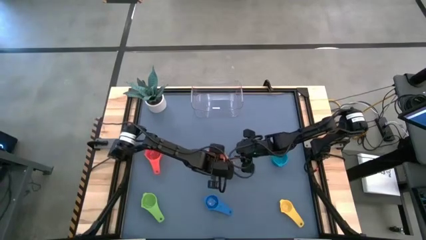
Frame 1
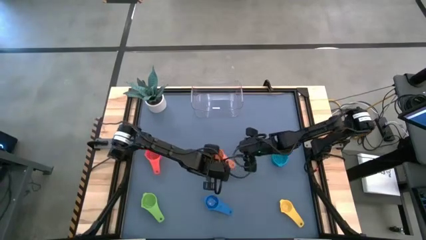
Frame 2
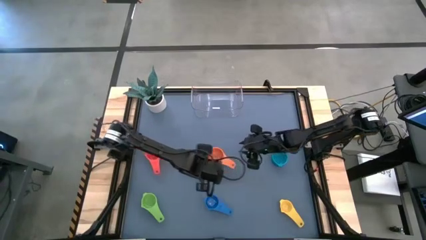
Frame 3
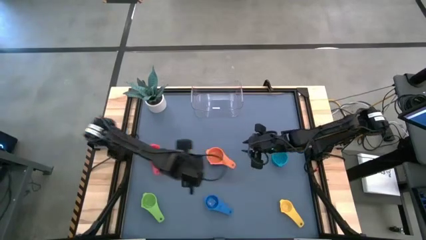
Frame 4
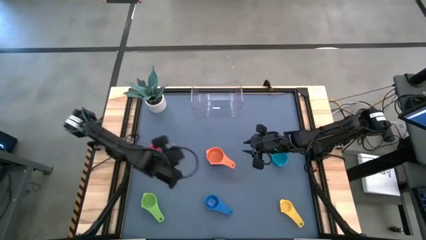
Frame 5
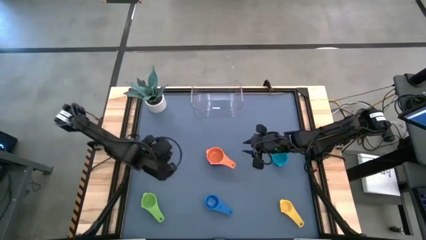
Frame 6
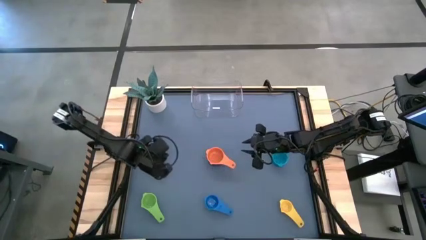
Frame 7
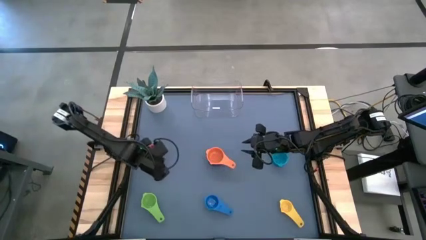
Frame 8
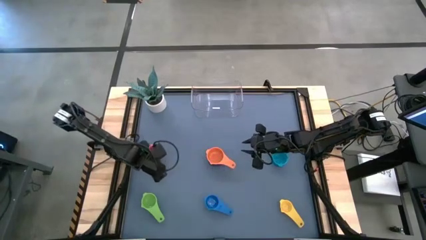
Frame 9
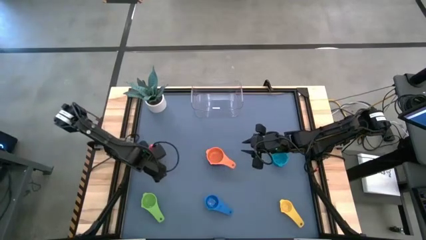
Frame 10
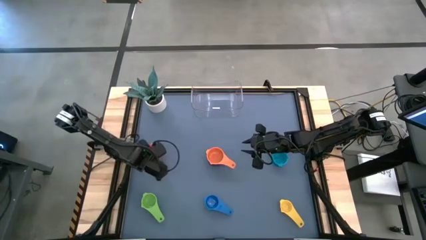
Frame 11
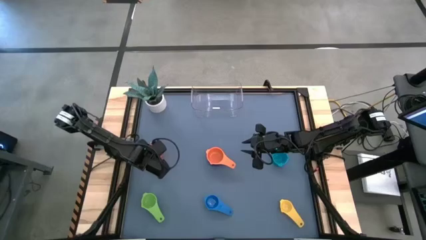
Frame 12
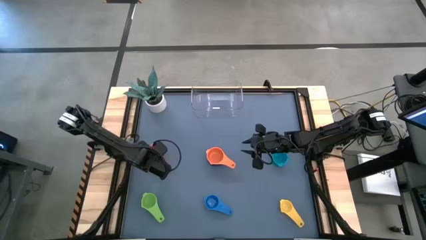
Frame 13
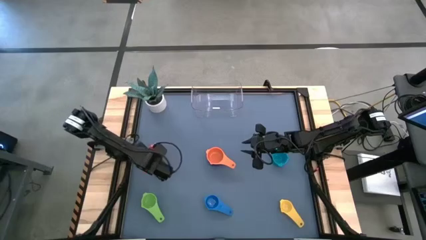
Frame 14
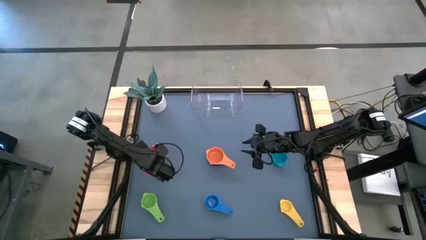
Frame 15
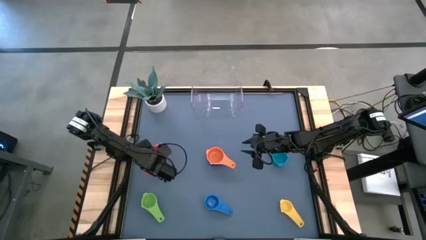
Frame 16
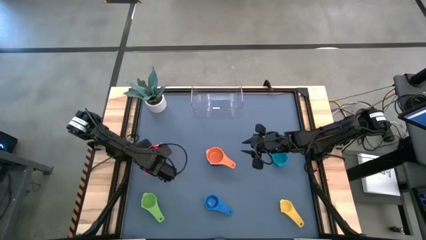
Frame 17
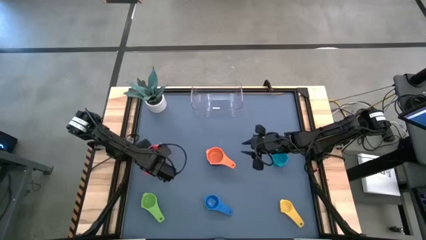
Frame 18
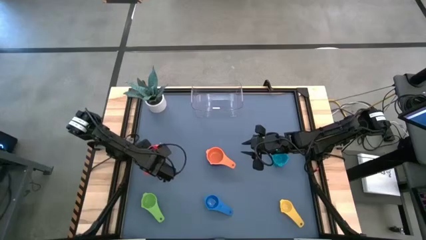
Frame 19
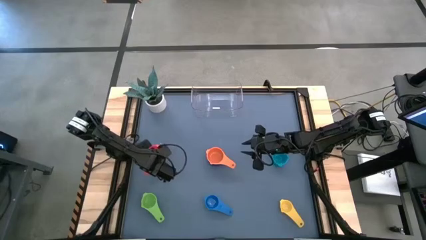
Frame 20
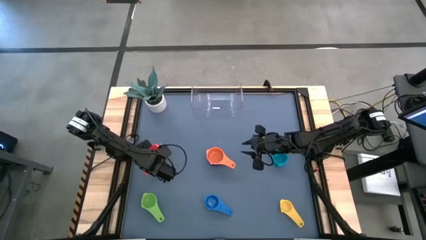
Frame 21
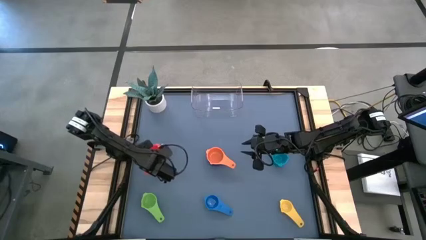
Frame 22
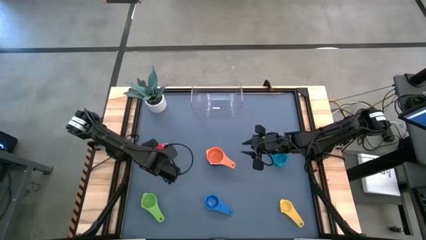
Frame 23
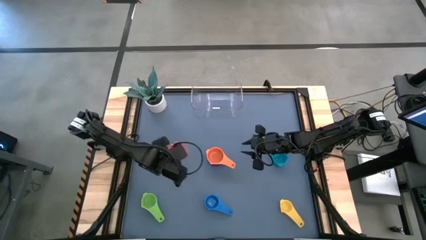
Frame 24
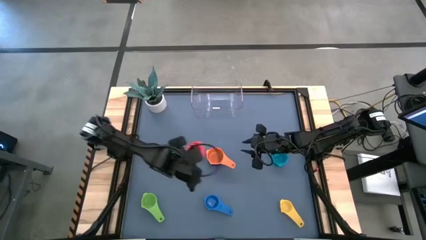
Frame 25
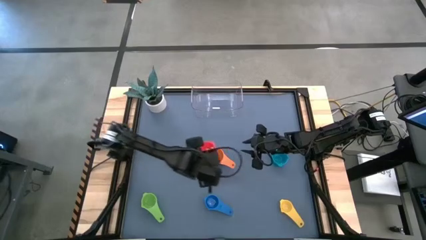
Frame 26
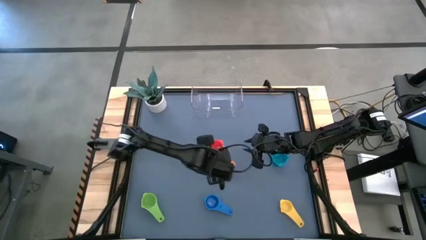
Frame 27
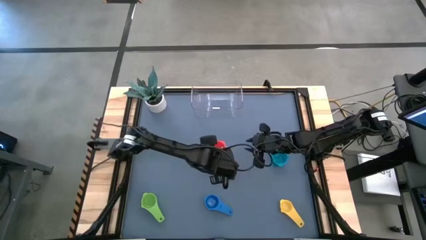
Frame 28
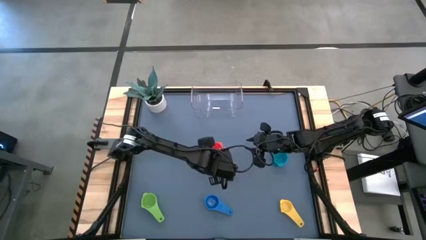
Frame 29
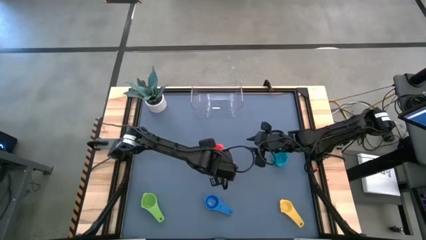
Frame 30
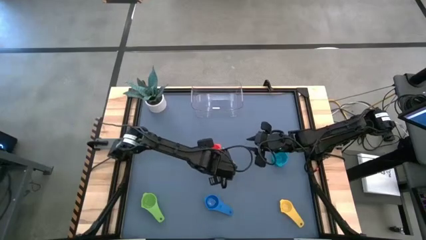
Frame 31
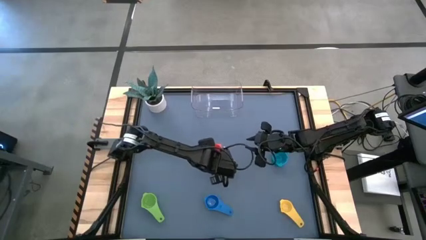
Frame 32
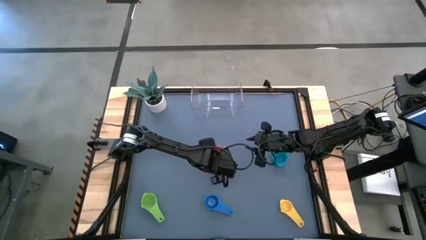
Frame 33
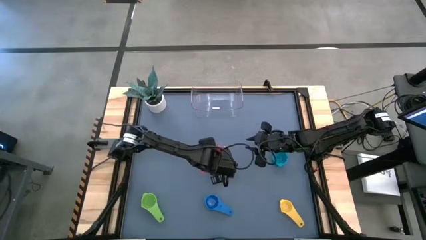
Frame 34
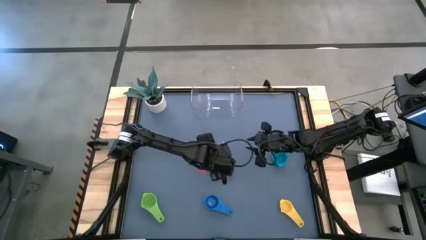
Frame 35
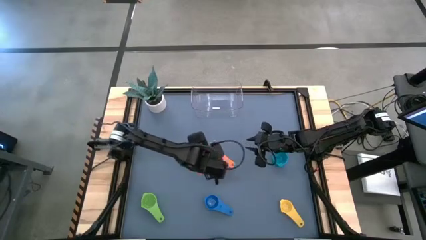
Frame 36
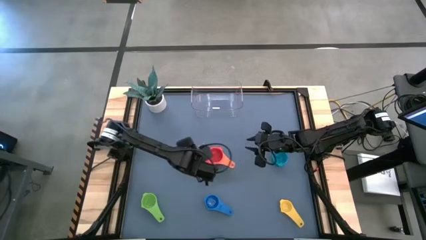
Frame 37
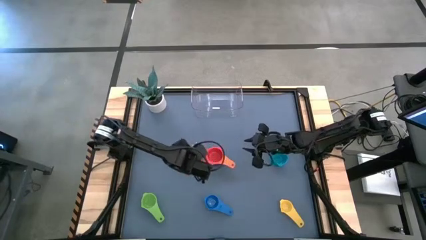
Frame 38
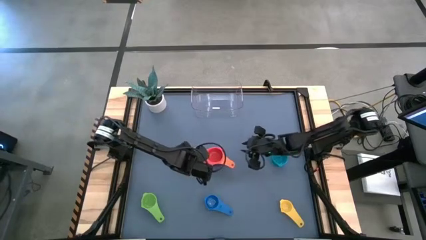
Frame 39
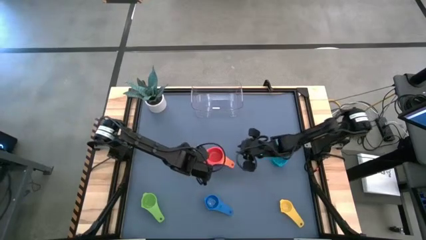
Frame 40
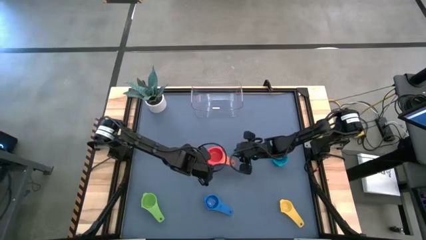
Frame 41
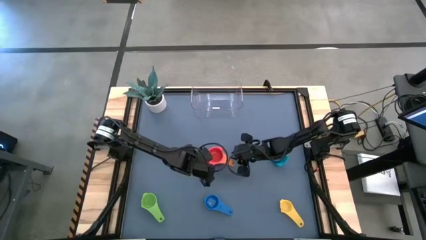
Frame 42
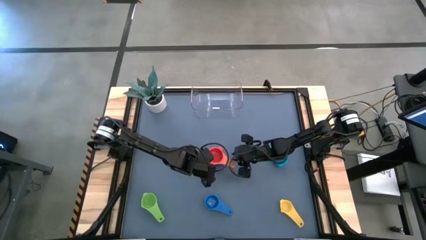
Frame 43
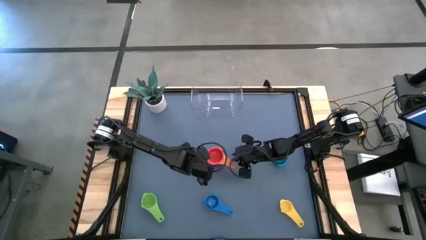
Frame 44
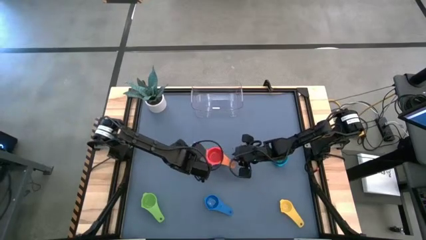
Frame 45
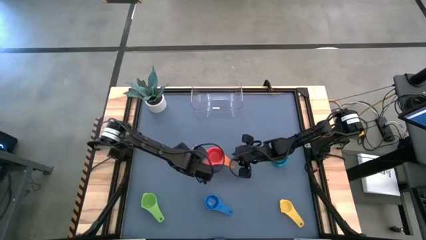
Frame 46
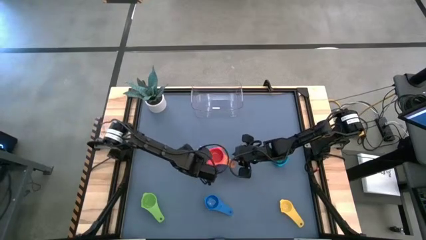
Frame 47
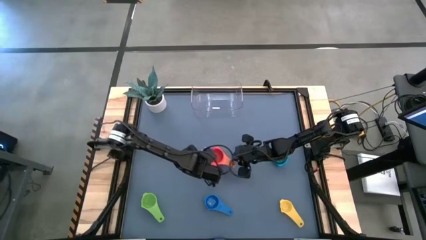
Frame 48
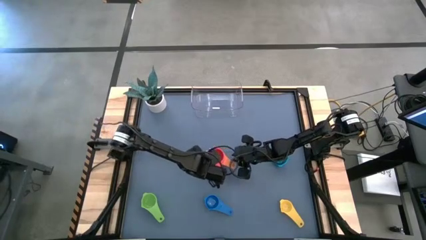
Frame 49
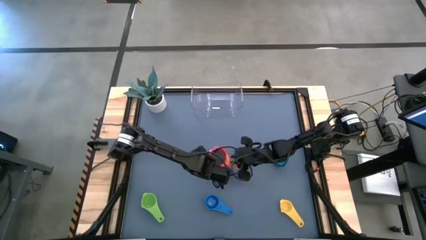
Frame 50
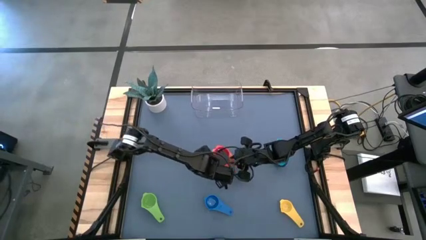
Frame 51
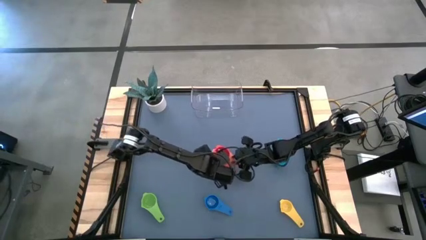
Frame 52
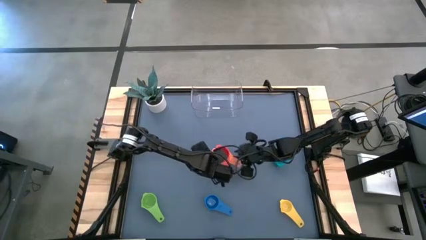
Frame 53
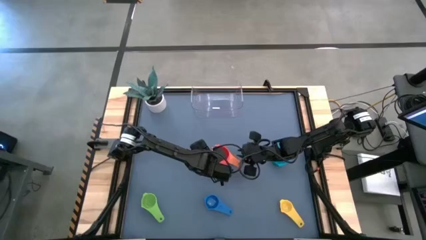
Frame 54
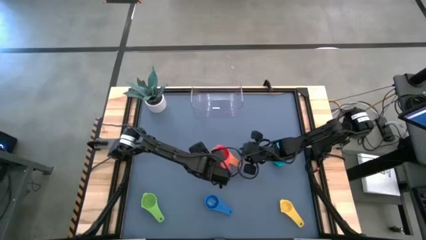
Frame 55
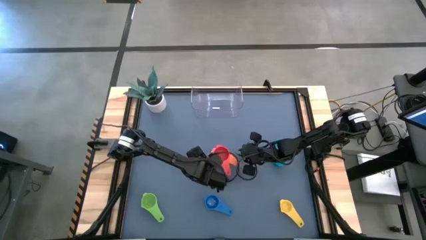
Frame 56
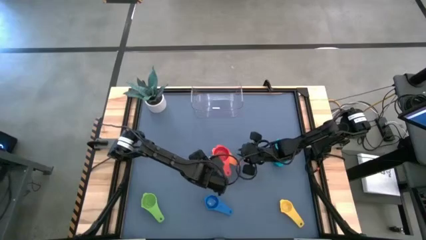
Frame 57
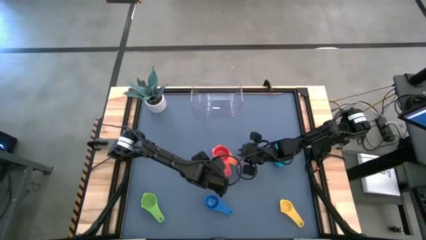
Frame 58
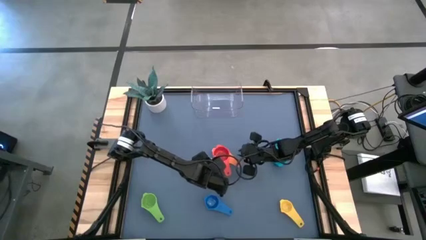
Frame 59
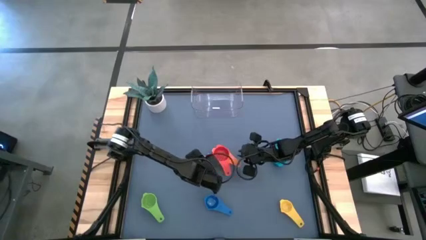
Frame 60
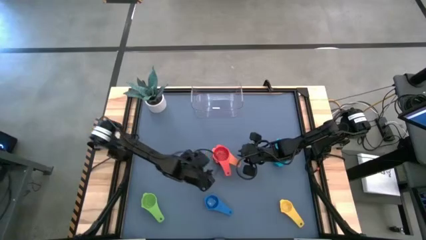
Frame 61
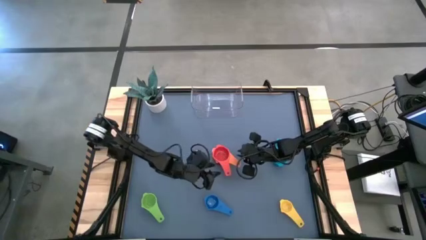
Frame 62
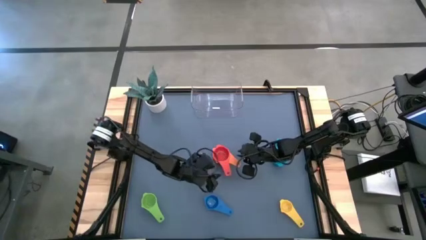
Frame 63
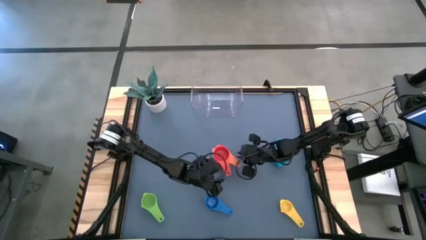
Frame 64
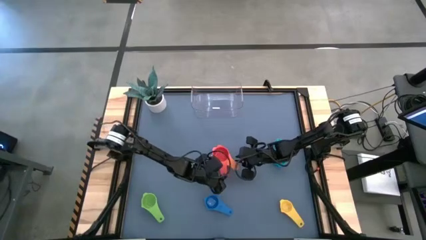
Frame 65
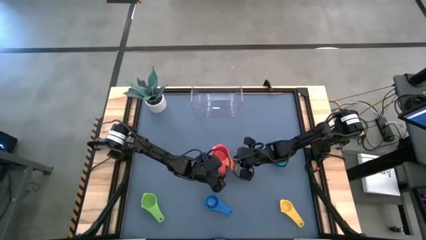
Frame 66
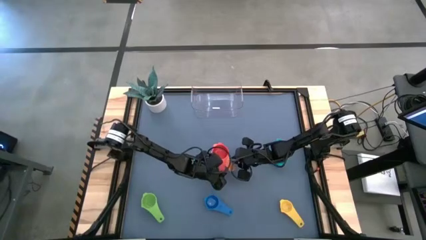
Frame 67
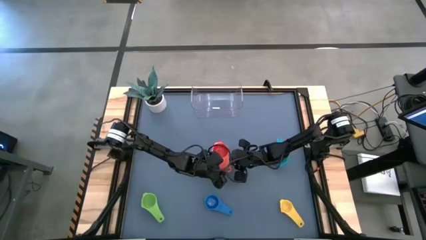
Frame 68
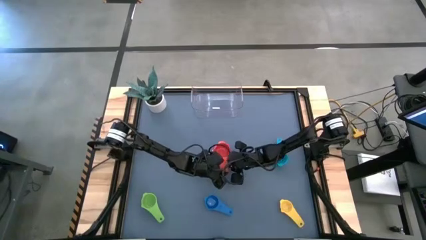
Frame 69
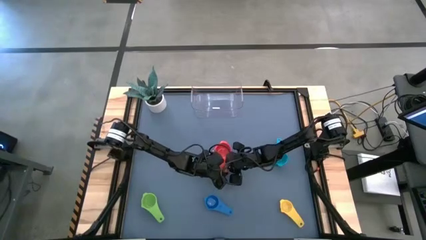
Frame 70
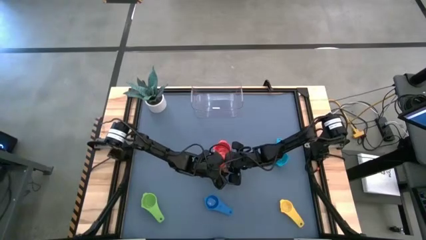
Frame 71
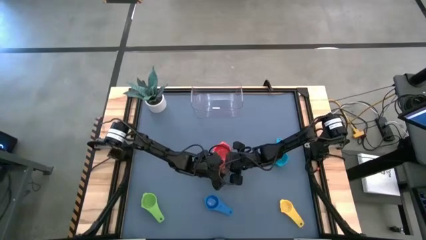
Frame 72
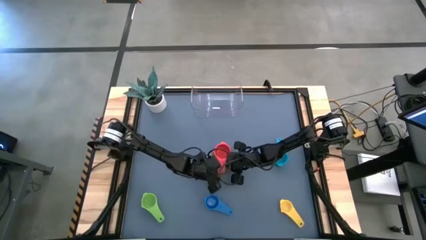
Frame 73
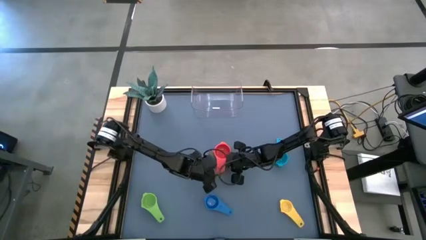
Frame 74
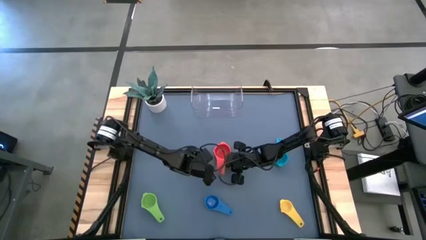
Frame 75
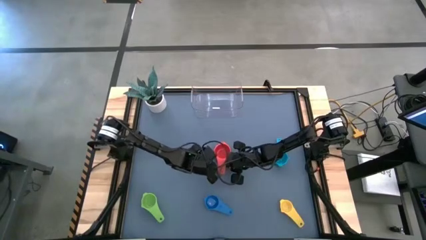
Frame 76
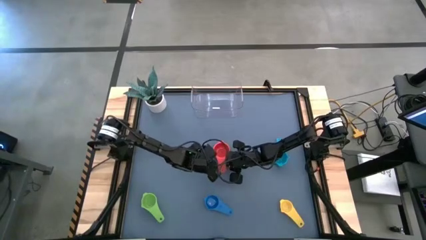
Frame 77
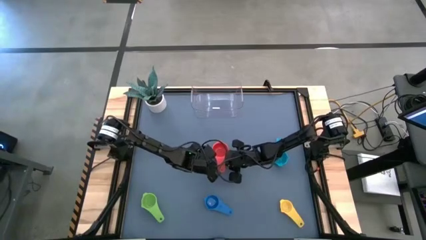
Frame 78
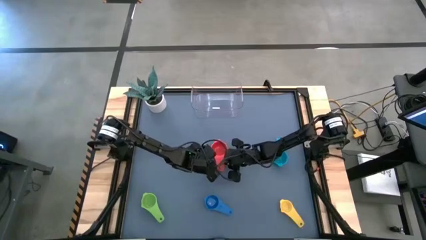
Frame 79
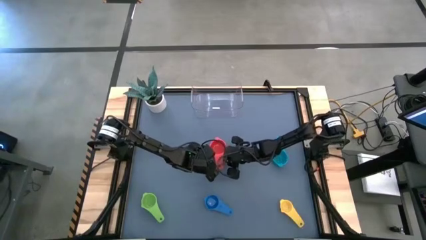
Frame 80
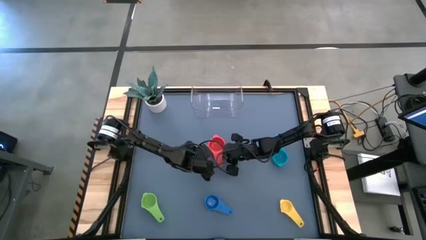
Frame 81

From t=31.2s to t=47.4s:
Task: Nest measuring cups in basket
Stack the red measuring cup on top of the orange measuring cup
